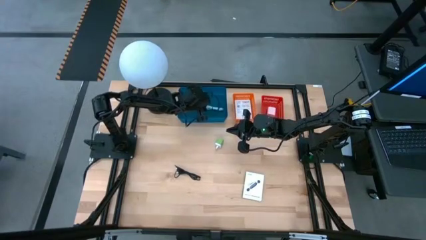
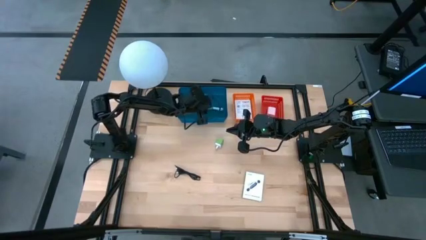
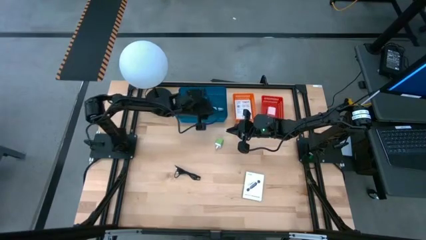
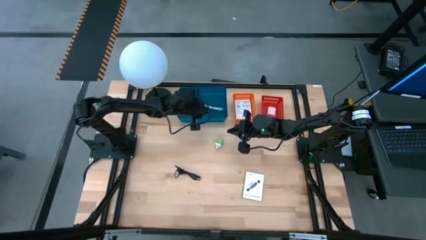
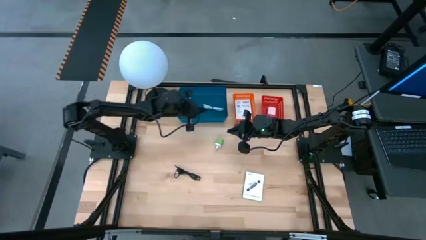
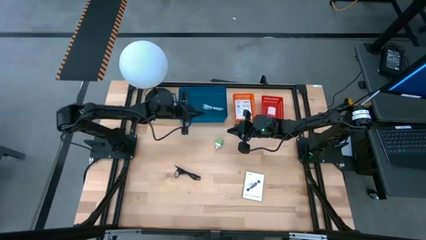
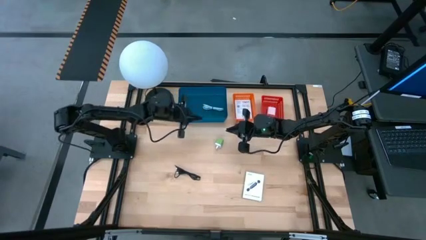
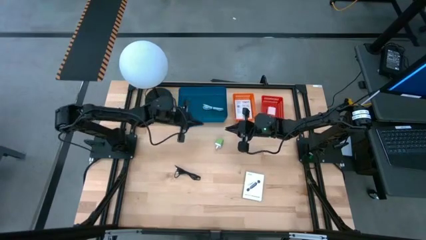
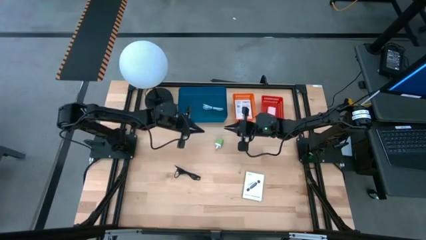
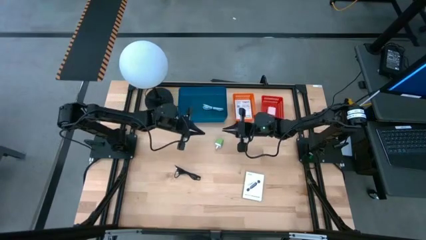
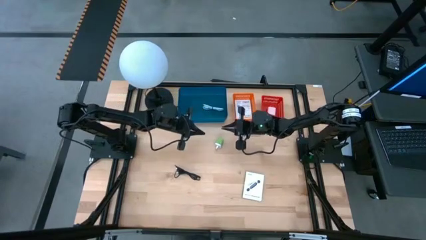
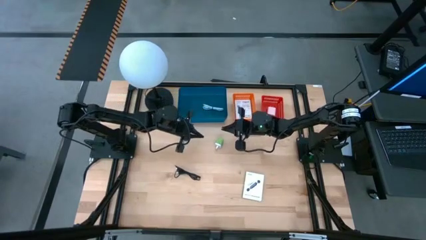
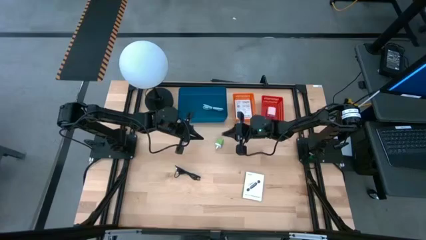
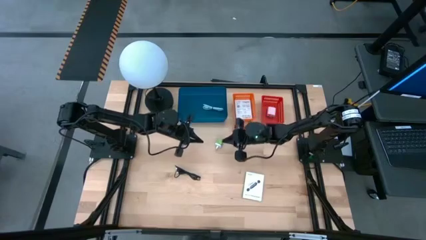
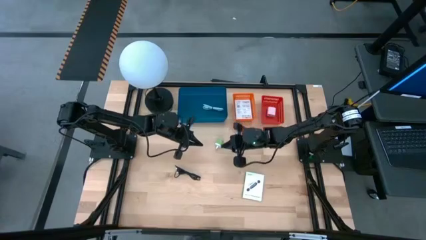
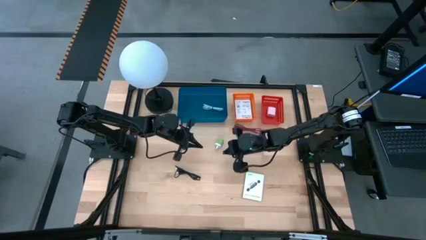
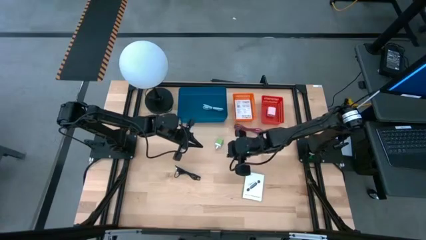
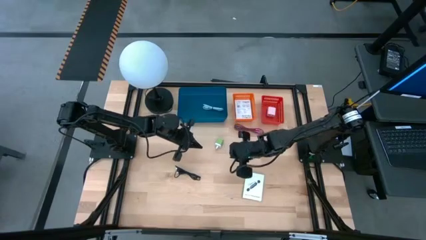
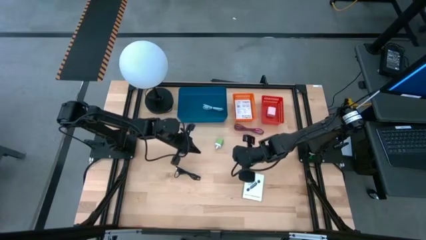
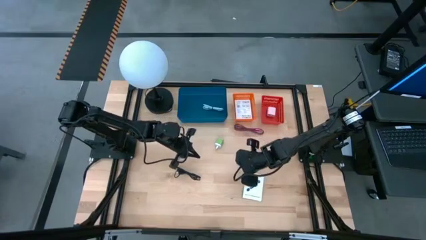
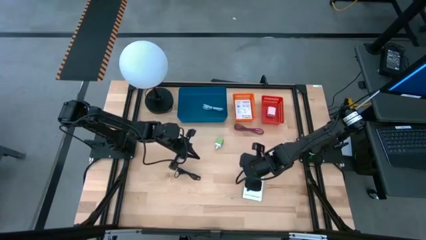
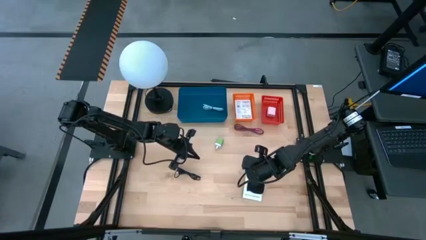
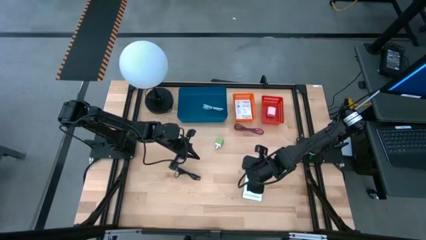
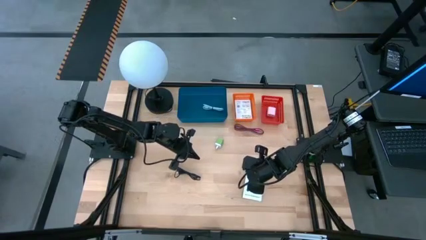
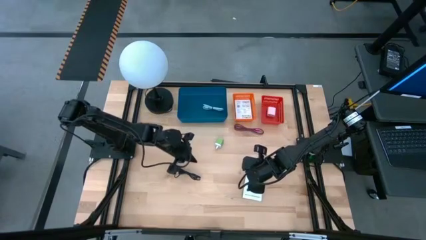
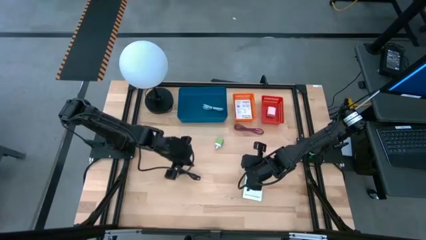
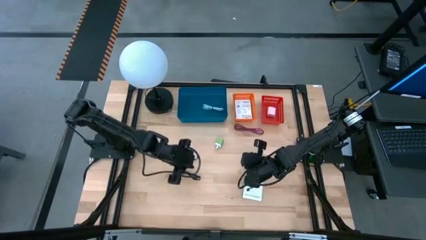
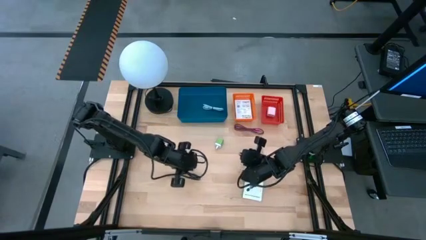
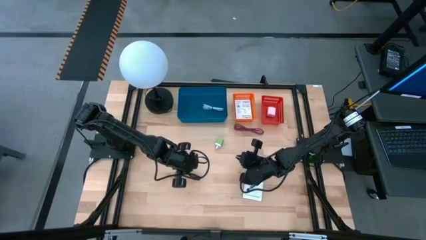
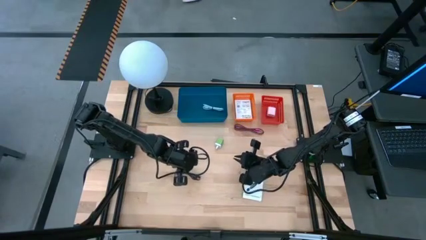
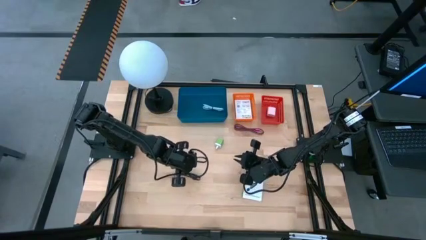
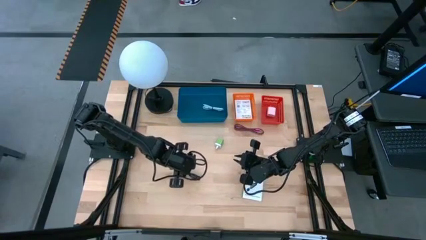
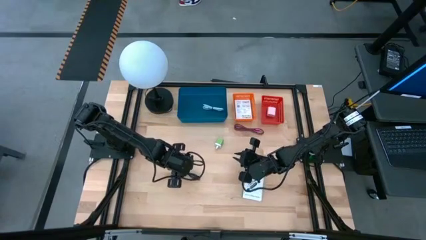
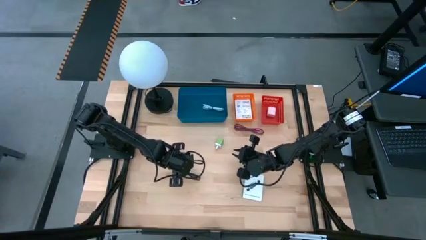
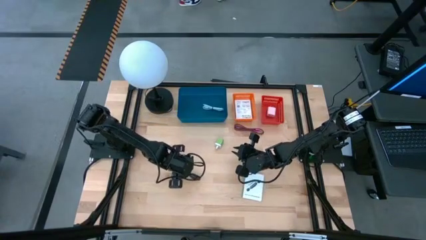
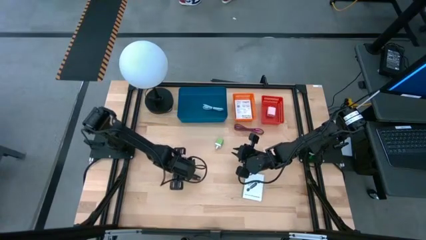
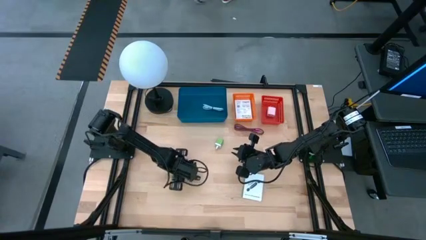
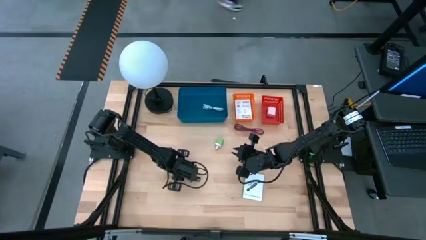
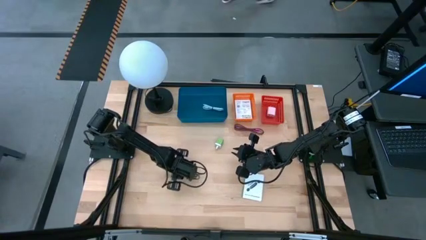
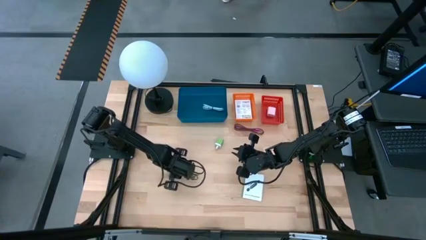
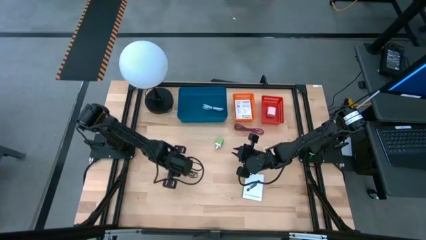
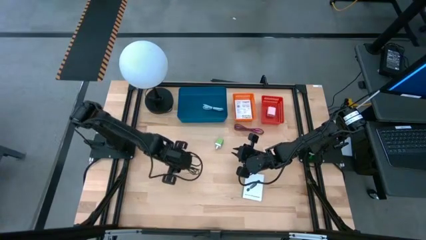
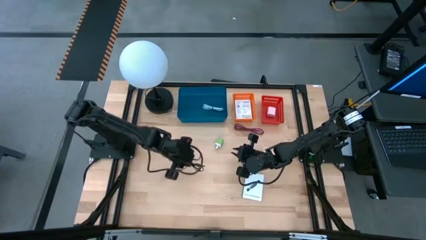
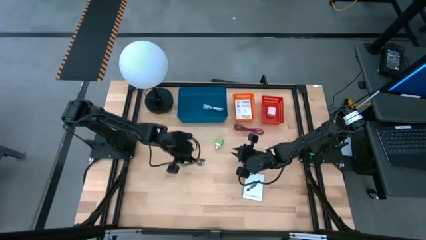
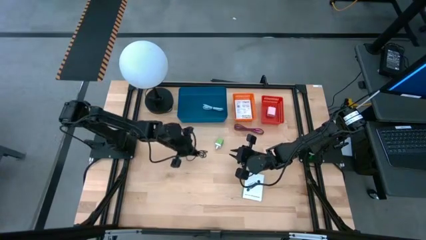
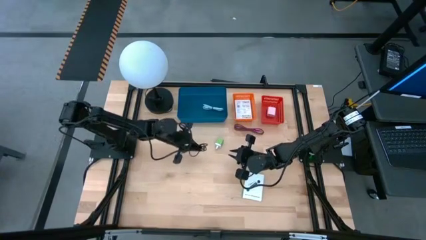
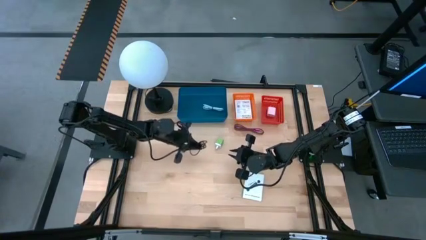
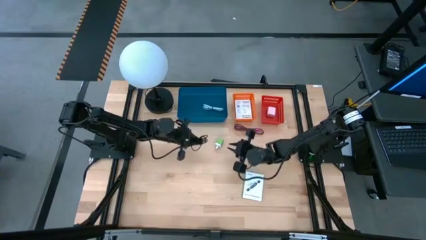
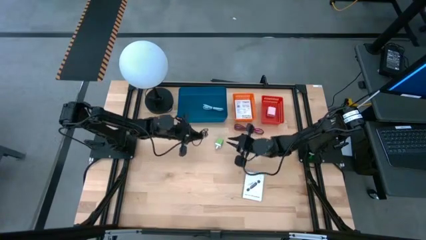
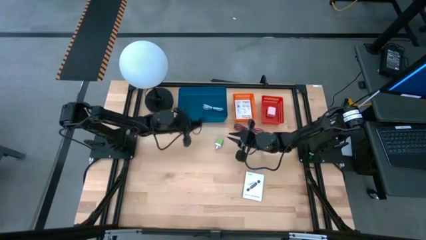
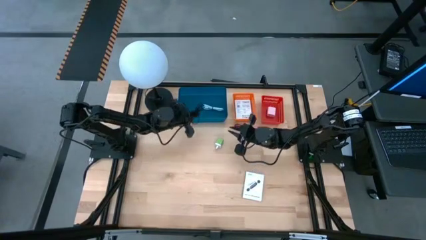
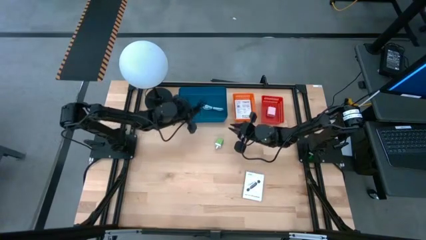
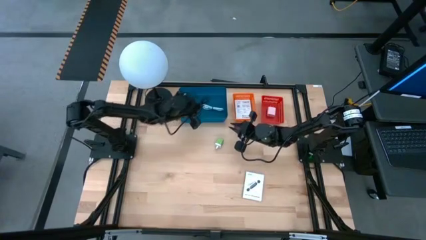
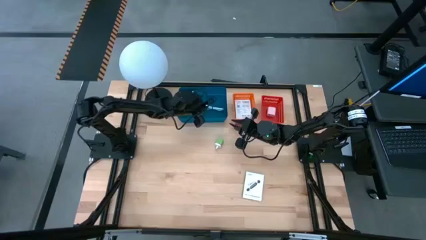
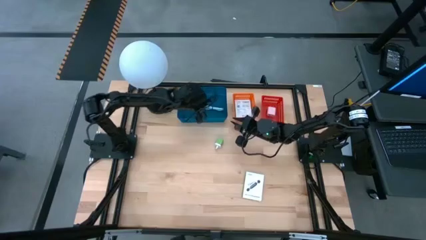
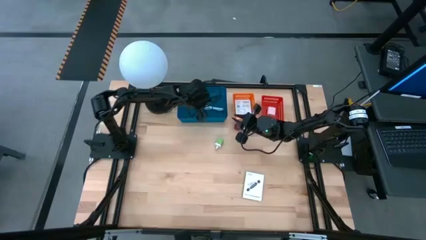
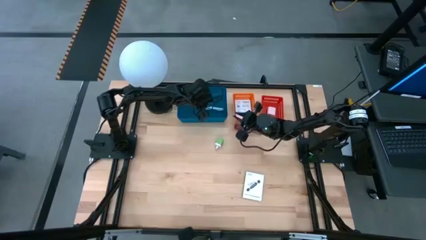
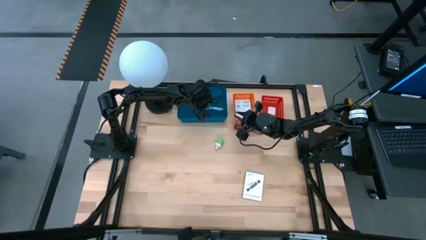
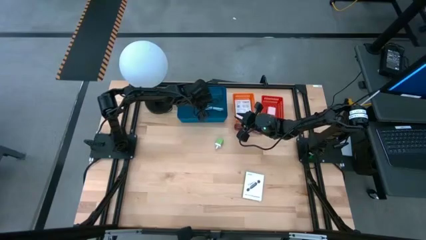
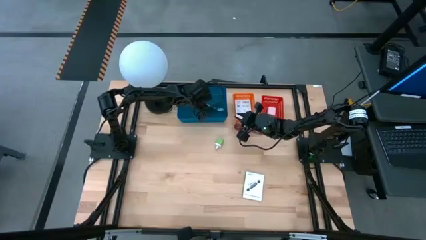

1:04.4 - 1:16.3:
Task: Pick and place items into bin
Put the black charger cable into the blue bin

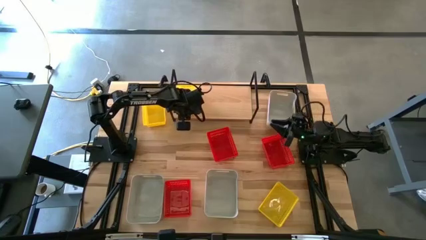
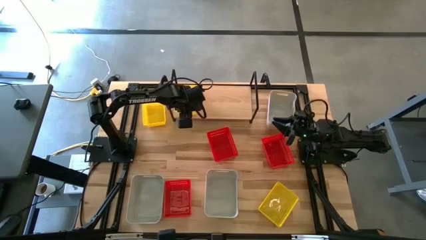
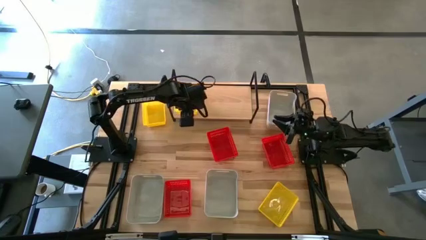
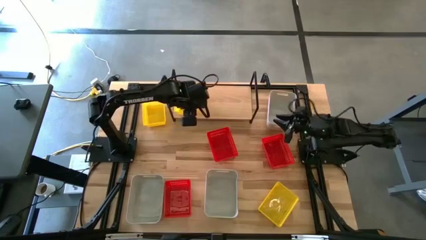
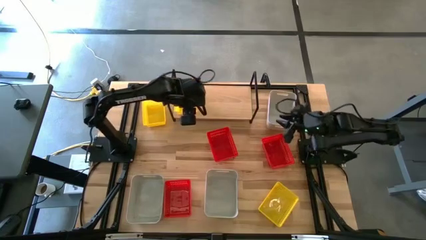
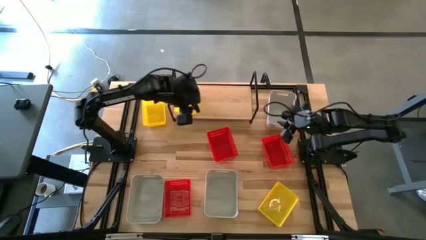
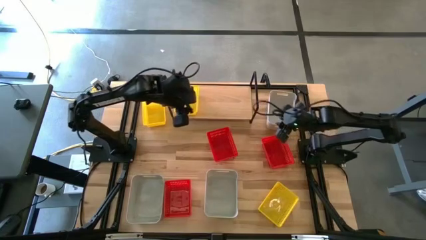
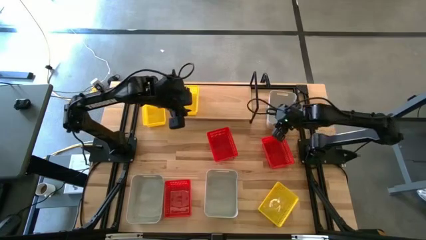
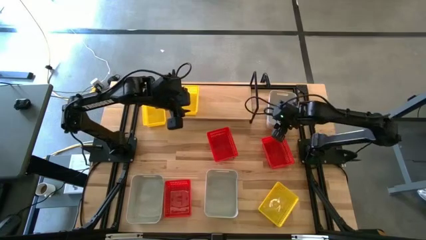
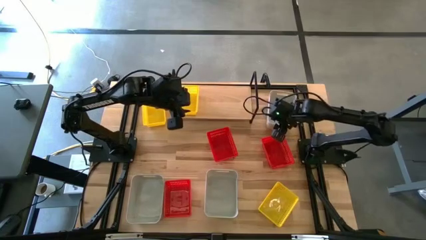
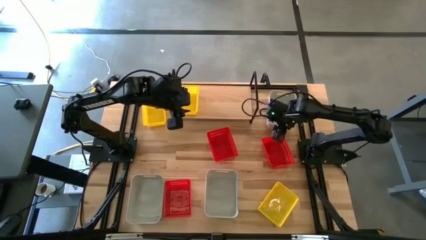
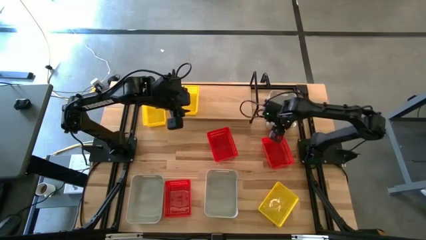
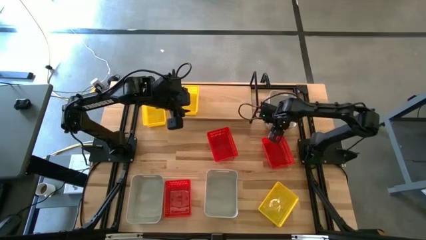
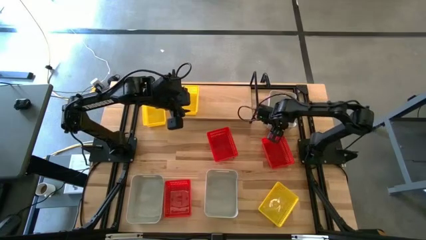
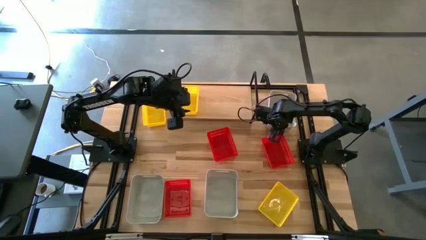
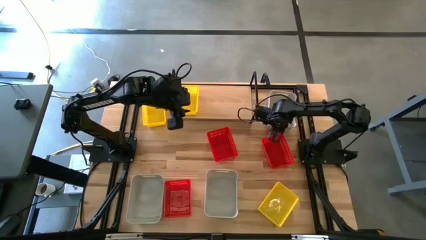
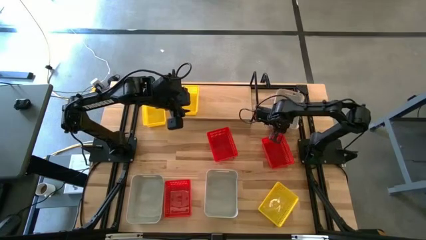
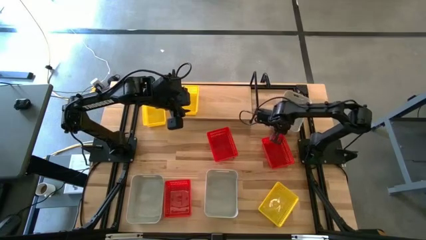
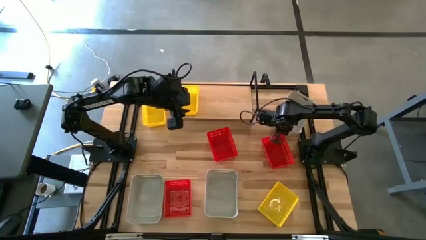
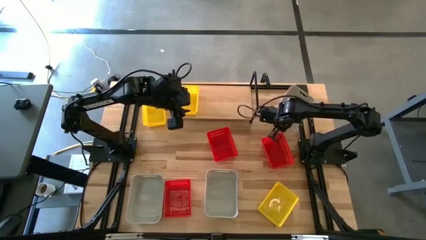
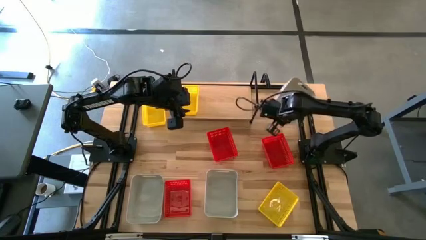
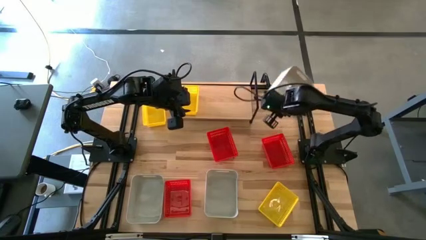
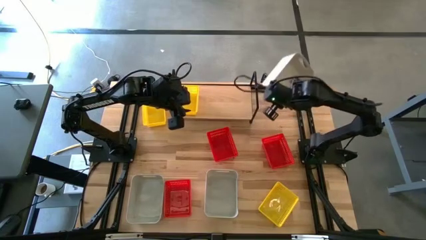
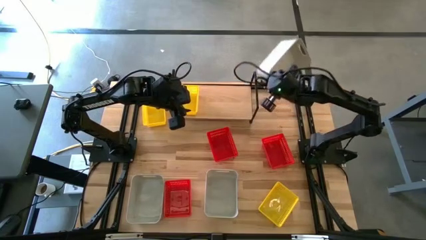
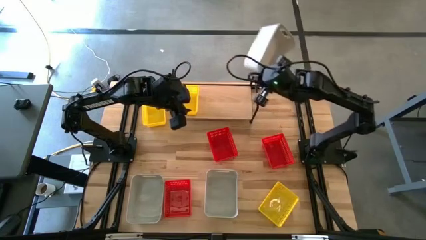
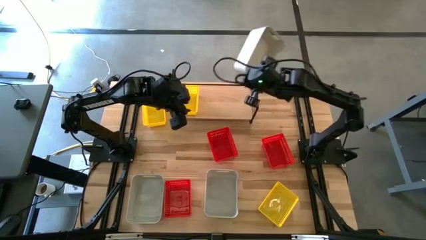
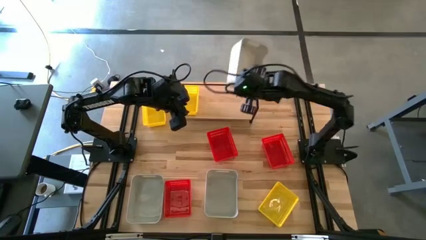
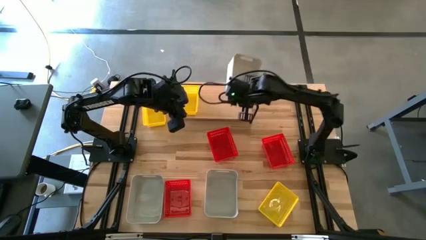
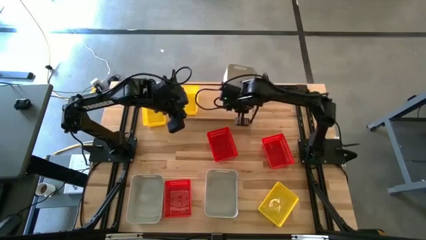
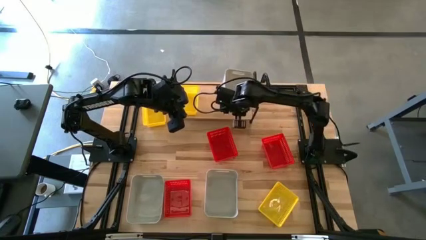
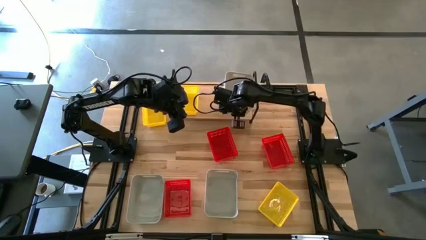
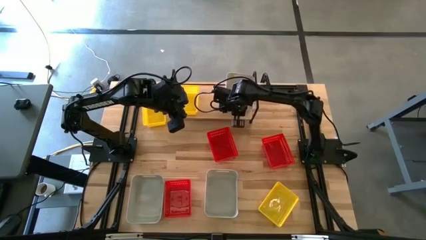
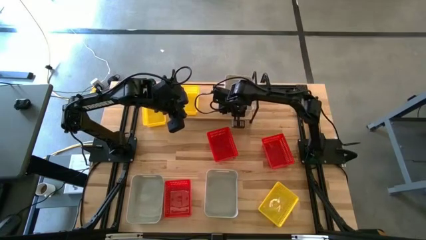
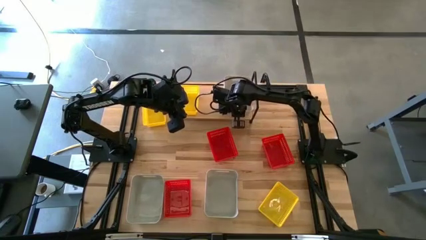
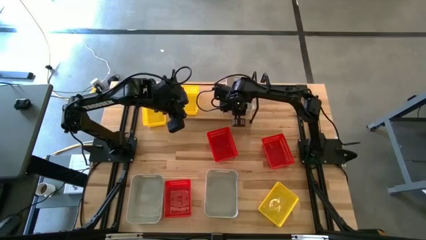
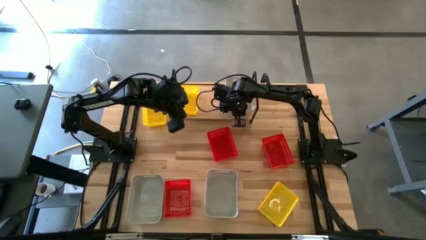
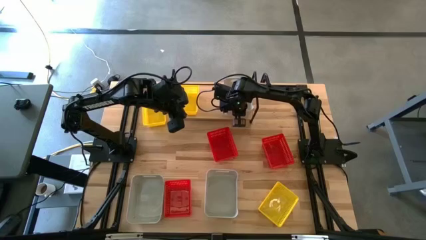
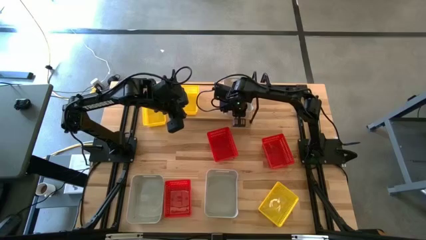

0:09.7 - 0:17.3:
Task: Stack baskets on shelf by color
Put the top right white bin on the shelf
